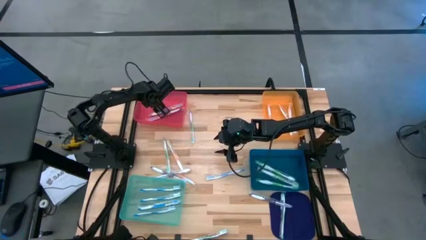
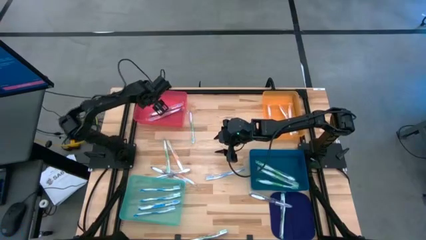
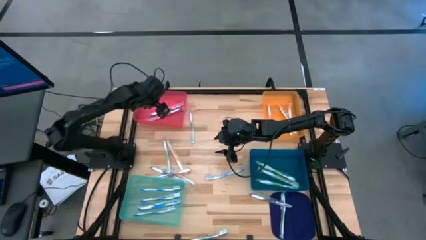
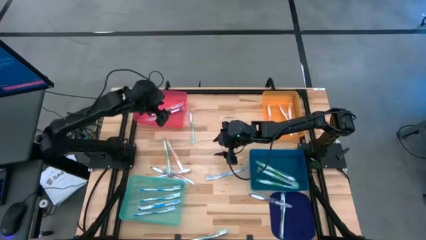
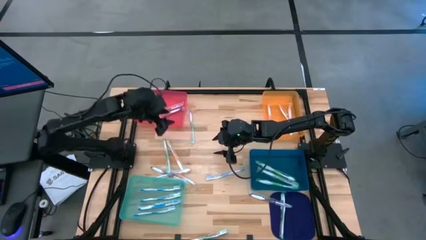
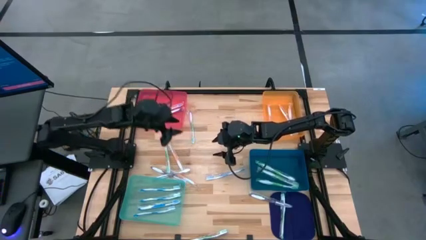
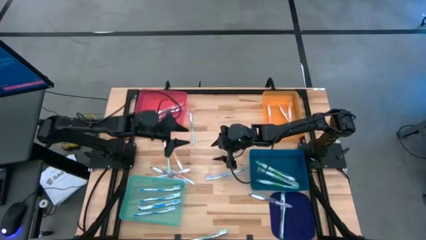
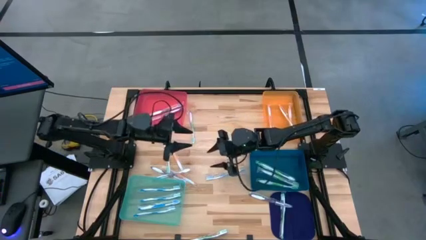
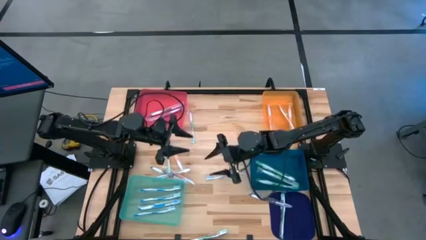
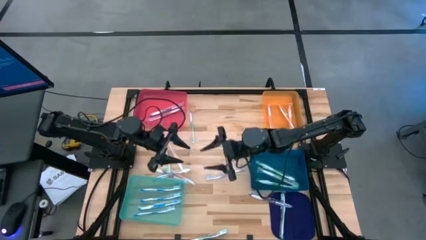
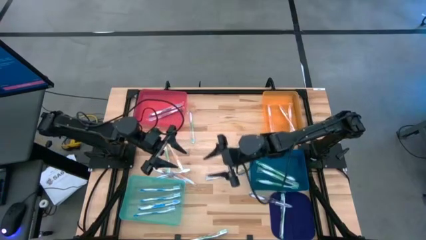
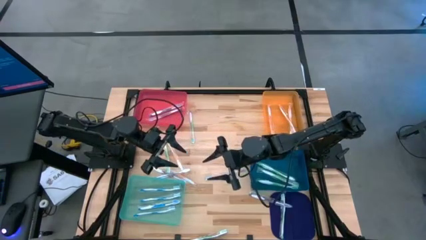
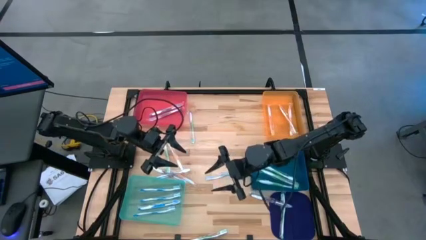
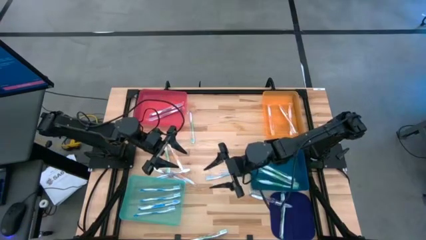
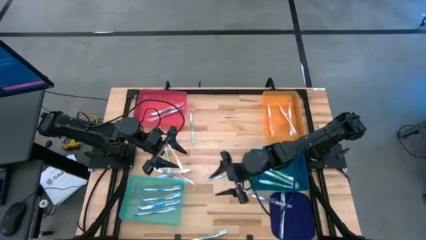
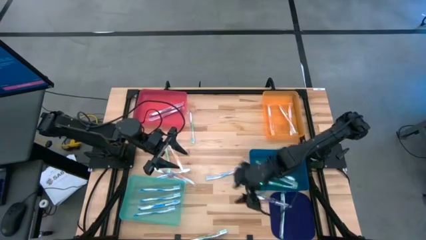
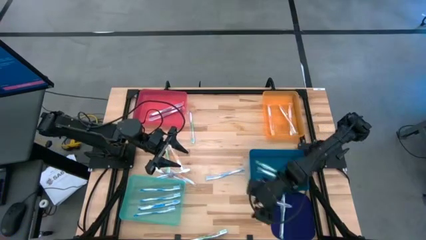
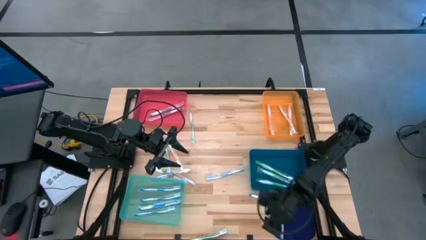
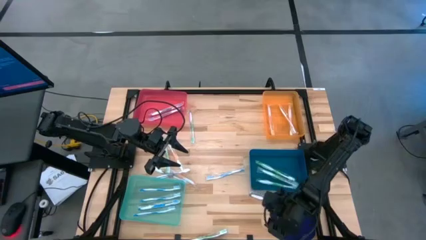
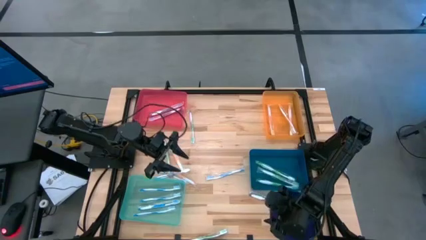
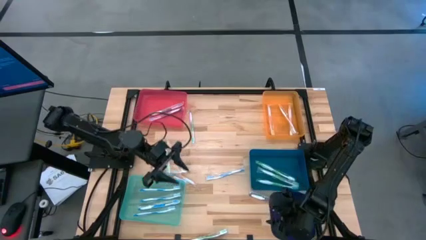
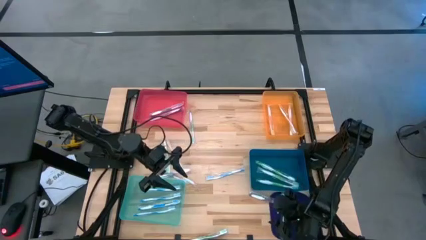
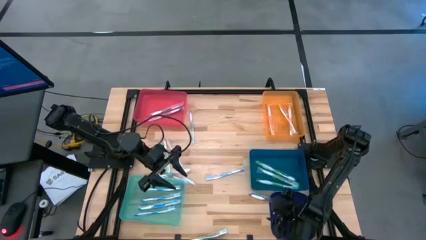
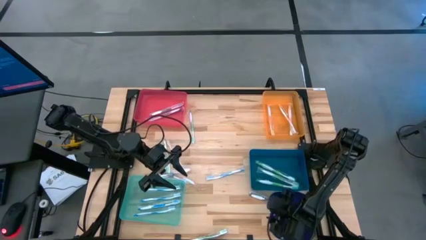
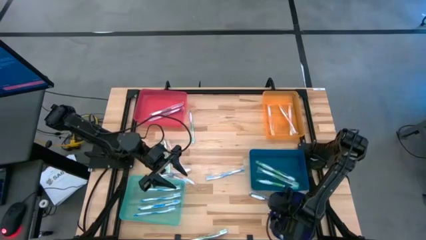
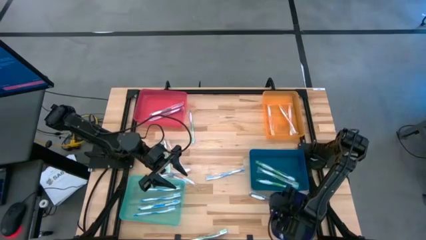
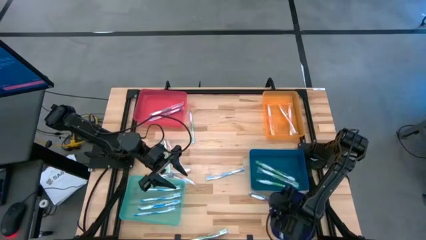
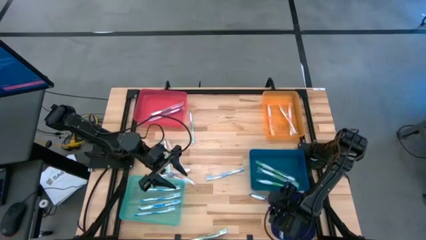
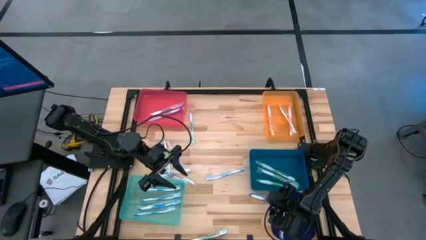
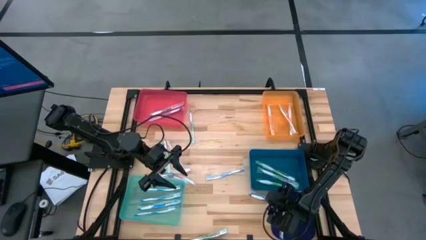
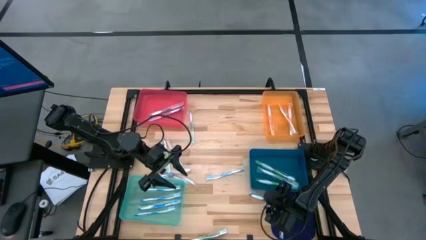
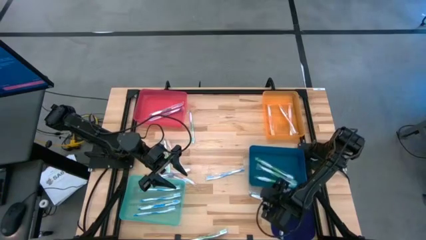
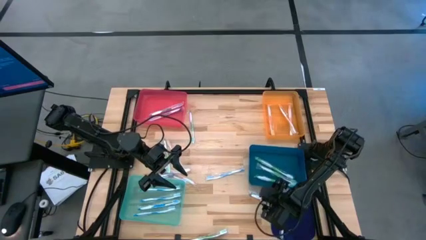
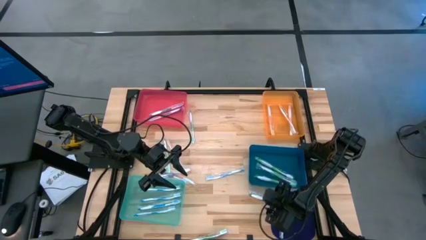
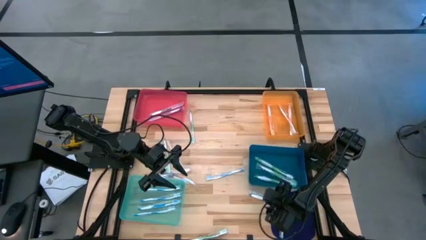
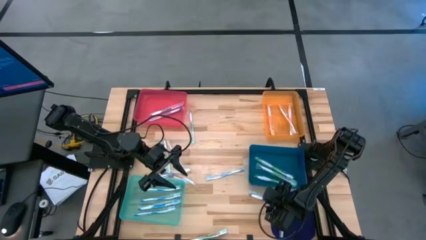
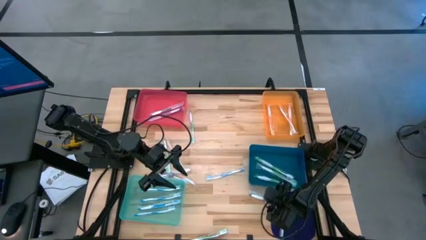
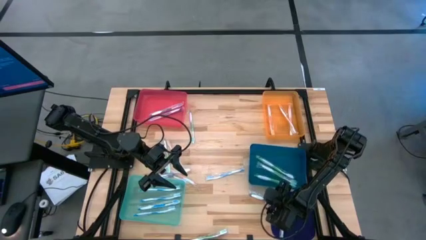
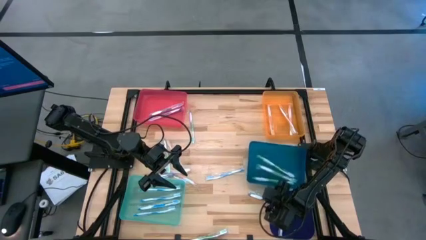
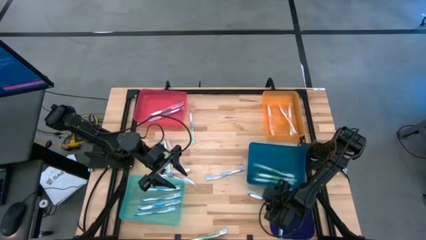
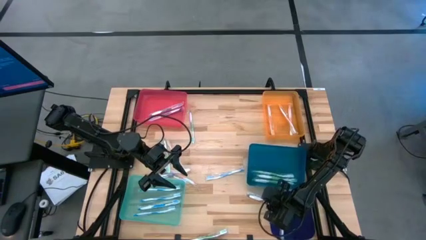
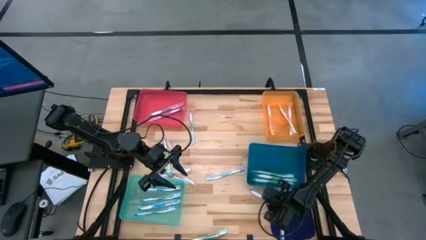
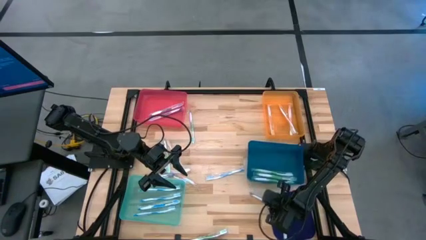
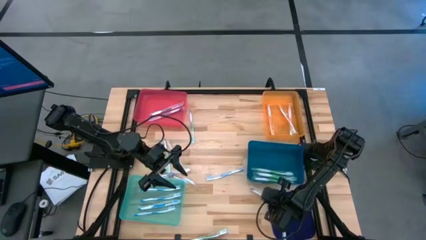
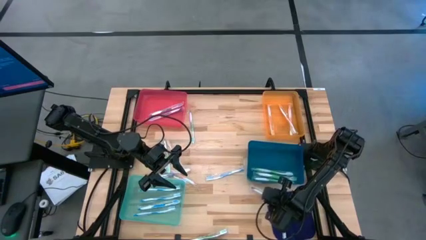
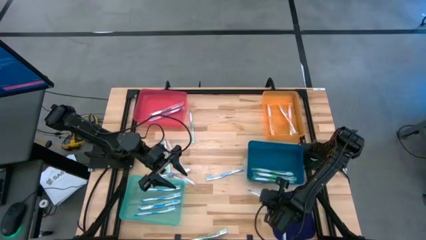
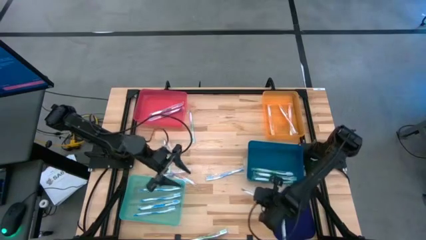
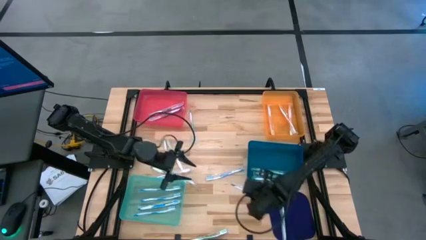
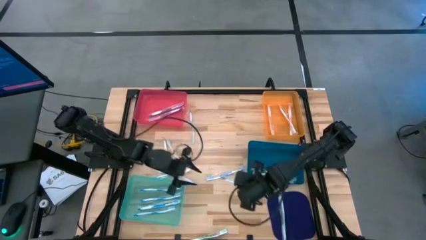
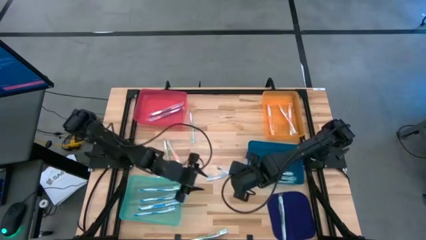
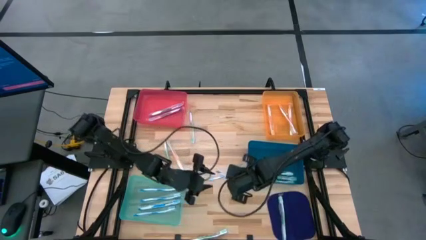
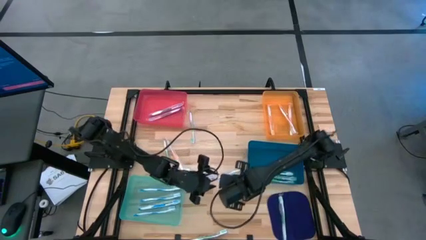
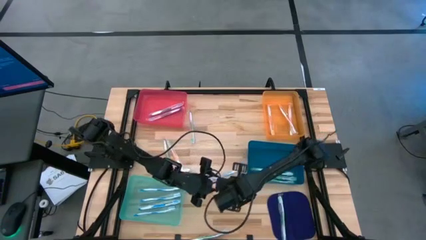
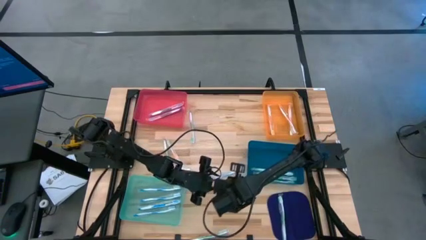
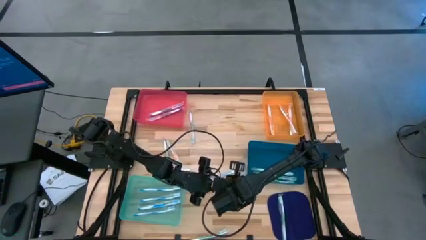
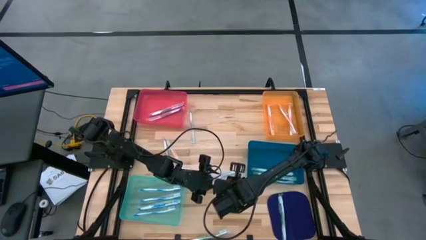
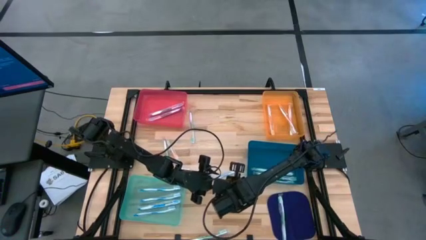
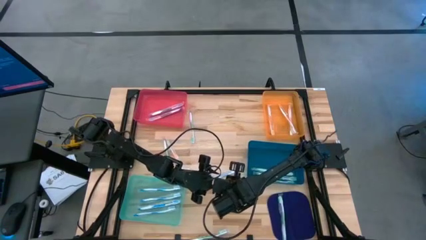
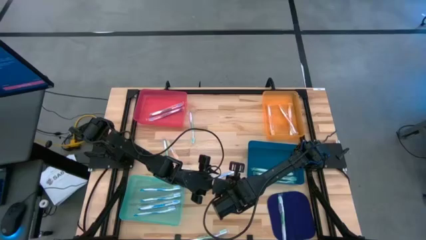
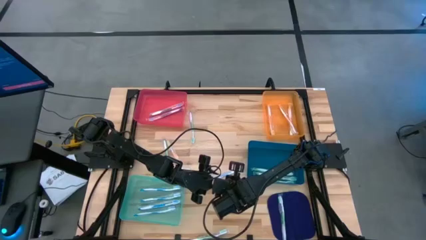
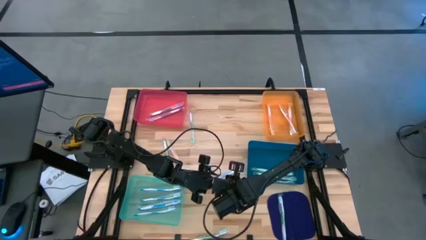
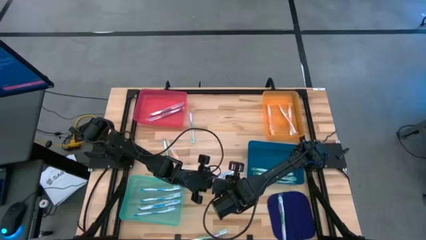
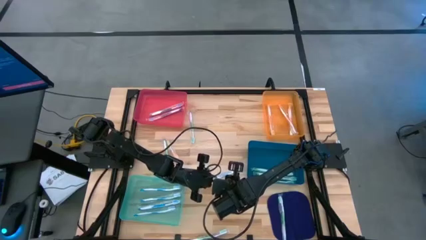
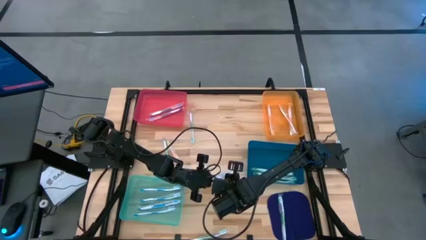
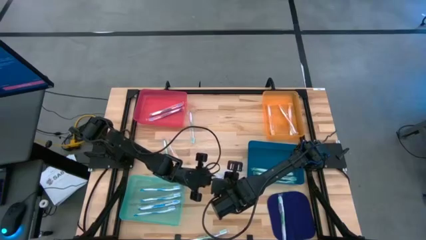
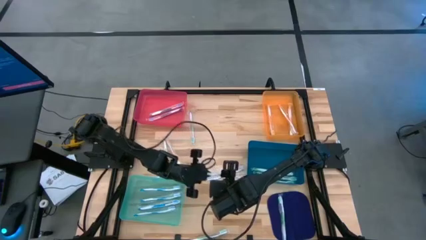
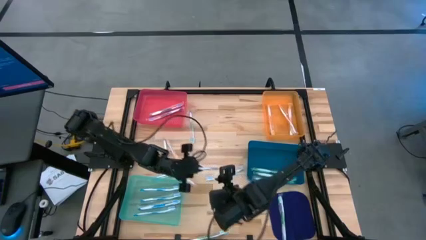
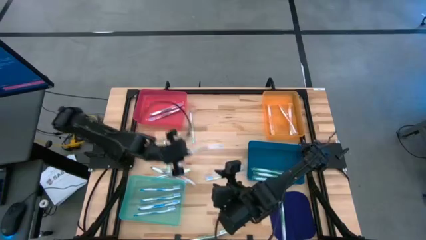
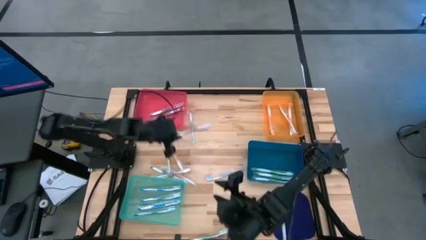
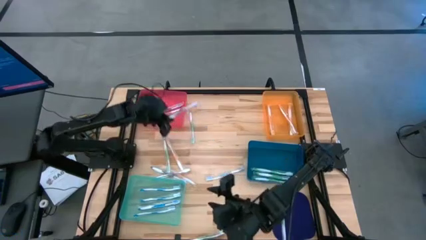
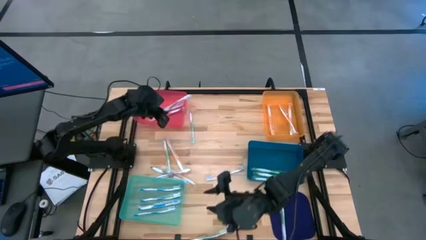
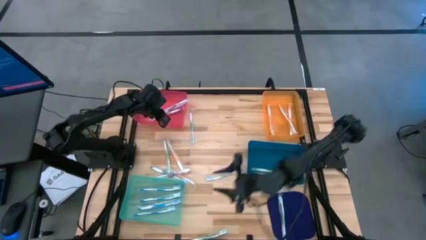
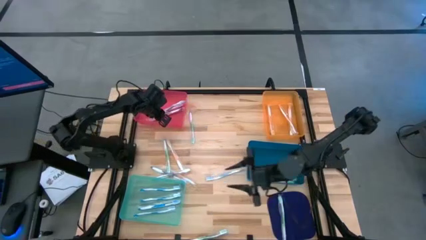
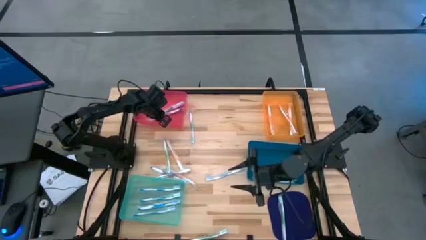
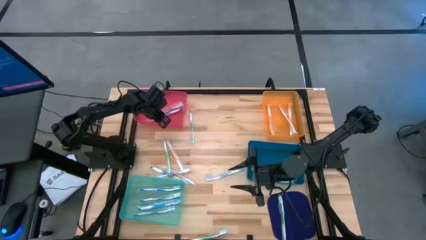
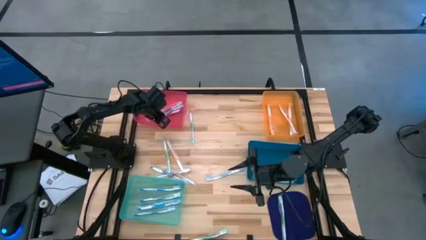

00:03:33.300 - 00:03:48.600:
Task: Pick & Place Toothbrushes
Put the violet toothbrush into the pink bin
